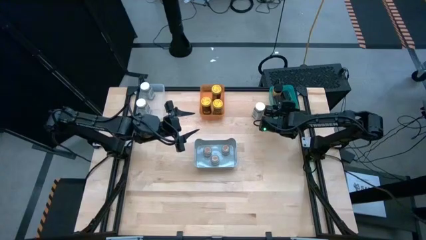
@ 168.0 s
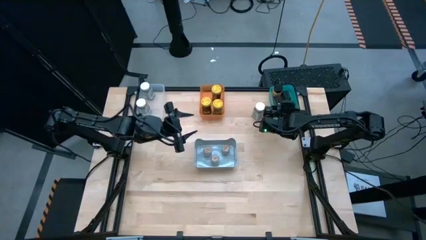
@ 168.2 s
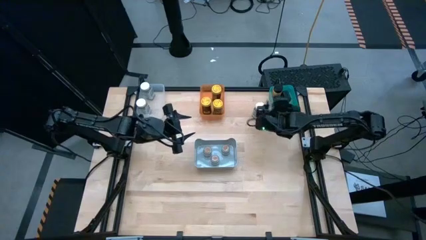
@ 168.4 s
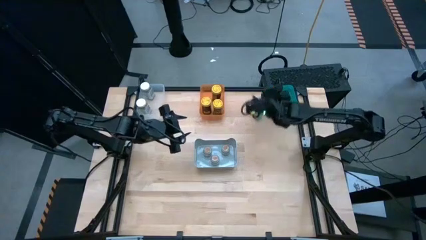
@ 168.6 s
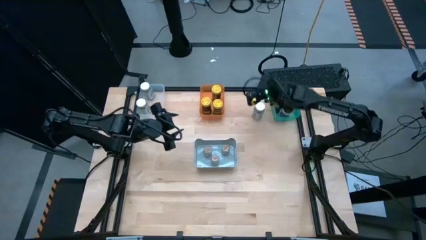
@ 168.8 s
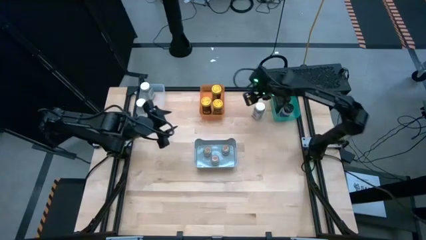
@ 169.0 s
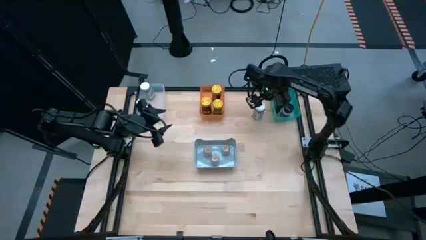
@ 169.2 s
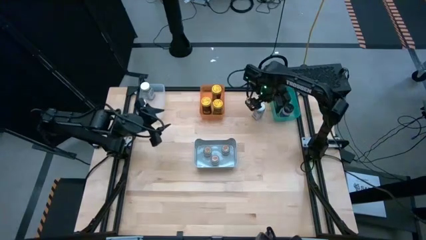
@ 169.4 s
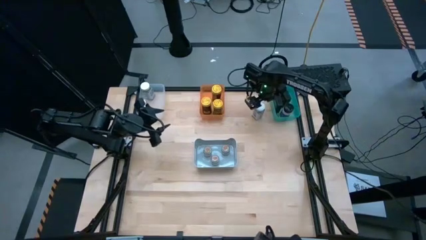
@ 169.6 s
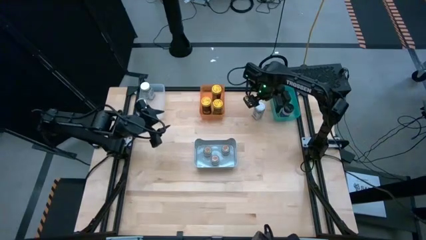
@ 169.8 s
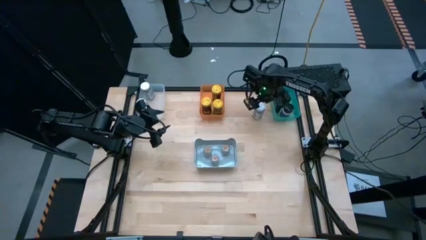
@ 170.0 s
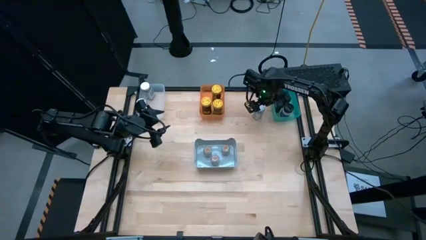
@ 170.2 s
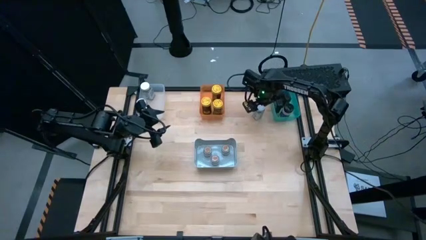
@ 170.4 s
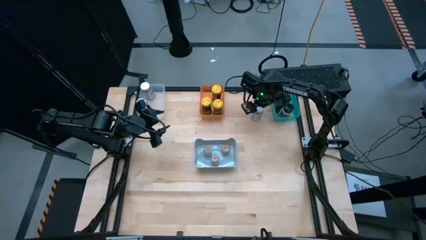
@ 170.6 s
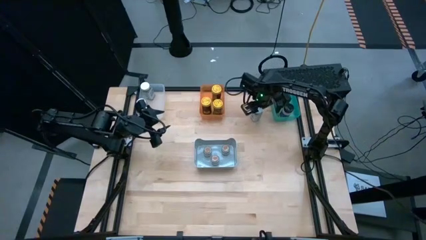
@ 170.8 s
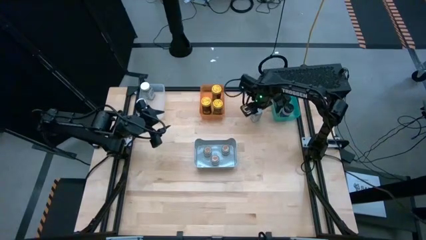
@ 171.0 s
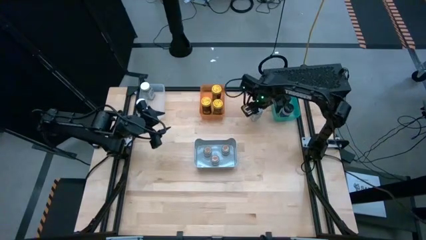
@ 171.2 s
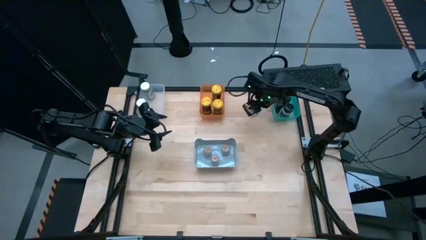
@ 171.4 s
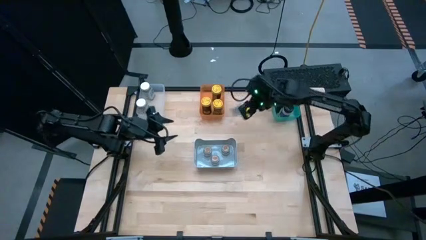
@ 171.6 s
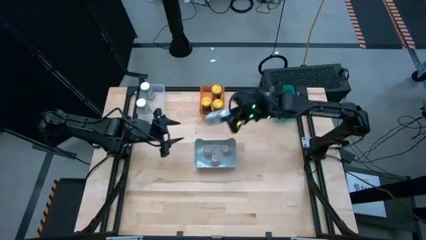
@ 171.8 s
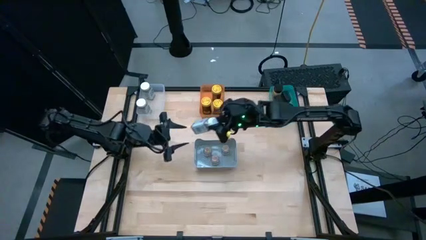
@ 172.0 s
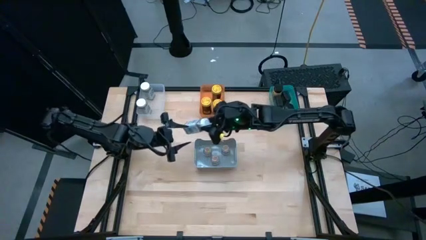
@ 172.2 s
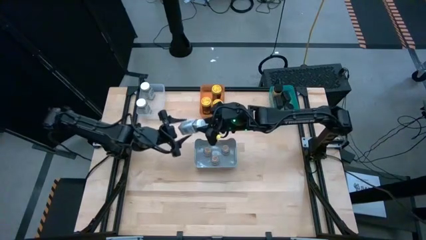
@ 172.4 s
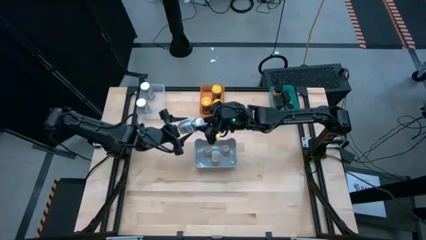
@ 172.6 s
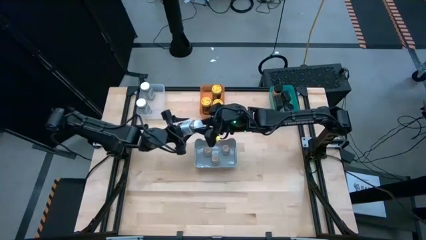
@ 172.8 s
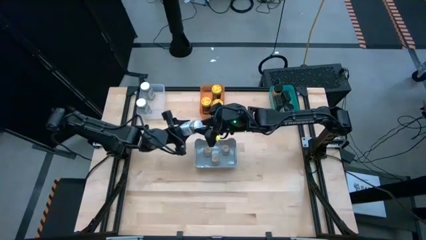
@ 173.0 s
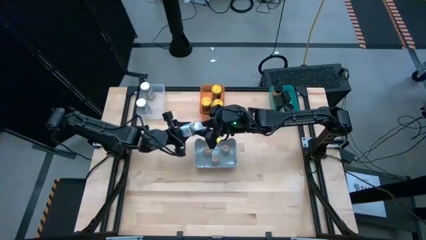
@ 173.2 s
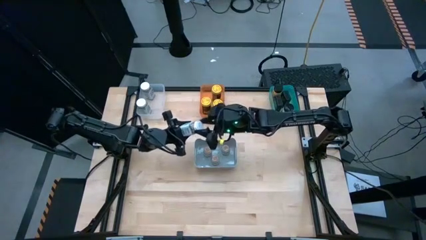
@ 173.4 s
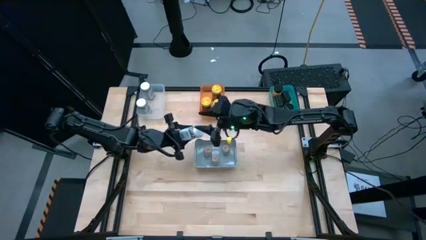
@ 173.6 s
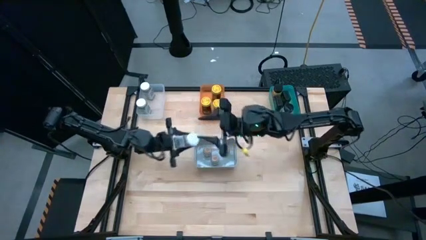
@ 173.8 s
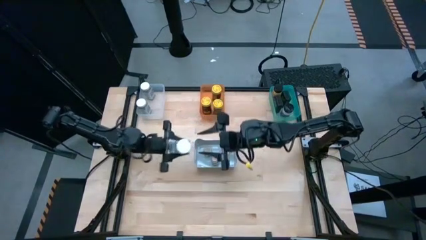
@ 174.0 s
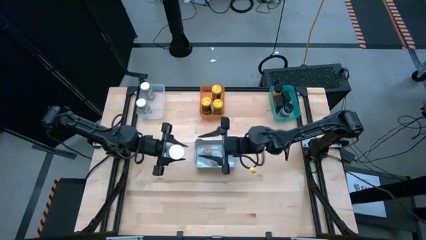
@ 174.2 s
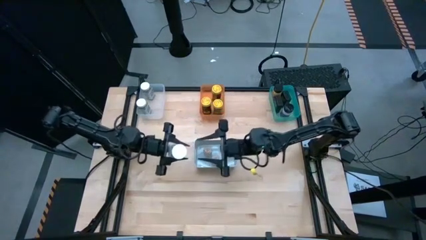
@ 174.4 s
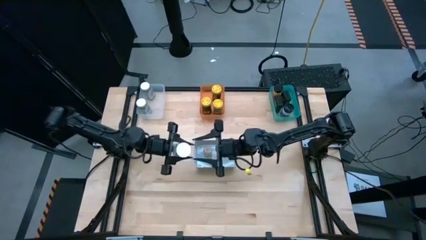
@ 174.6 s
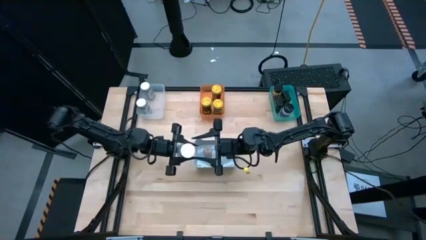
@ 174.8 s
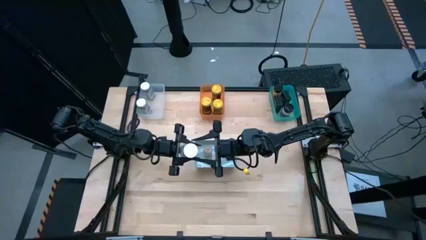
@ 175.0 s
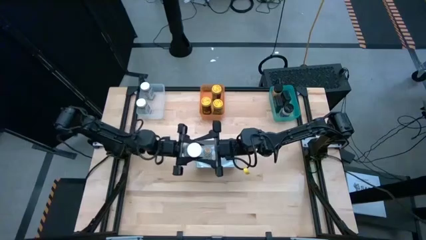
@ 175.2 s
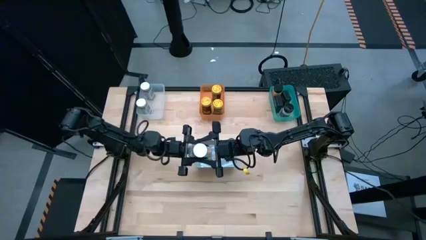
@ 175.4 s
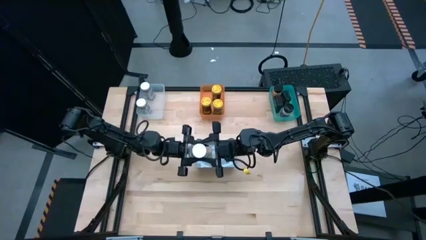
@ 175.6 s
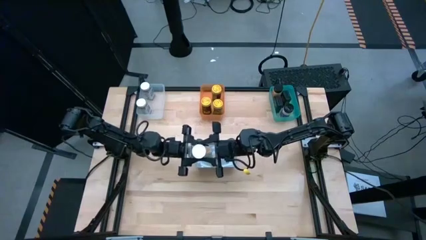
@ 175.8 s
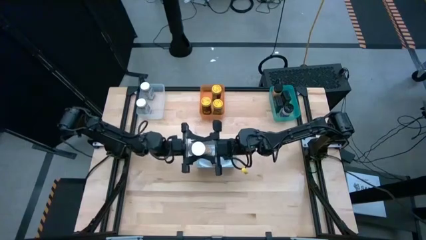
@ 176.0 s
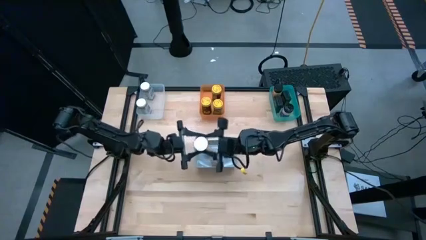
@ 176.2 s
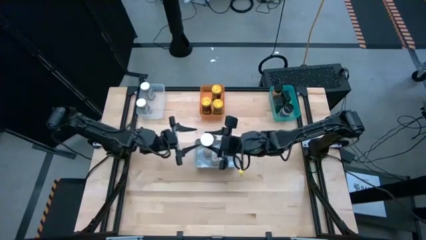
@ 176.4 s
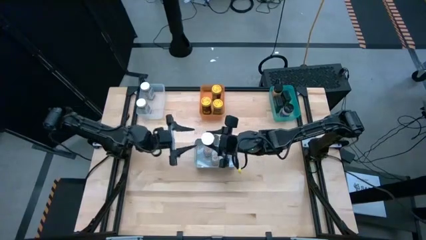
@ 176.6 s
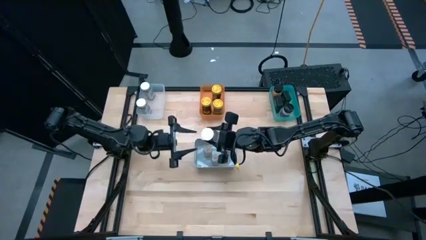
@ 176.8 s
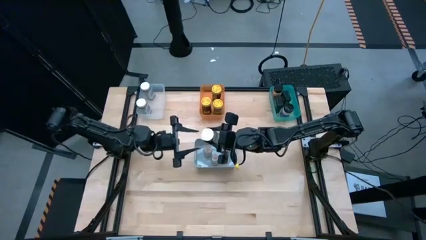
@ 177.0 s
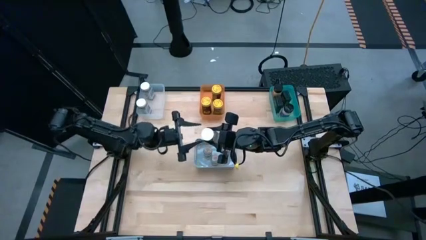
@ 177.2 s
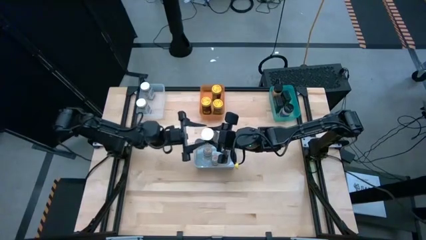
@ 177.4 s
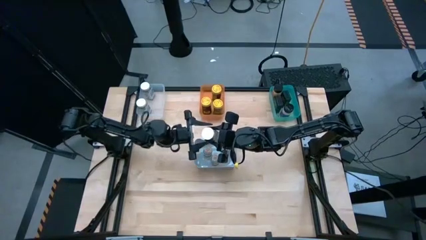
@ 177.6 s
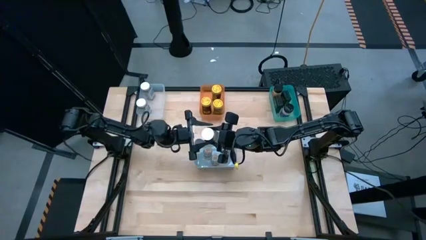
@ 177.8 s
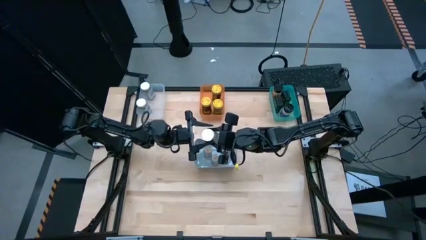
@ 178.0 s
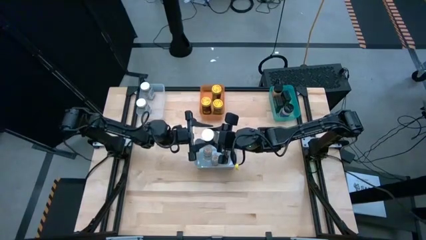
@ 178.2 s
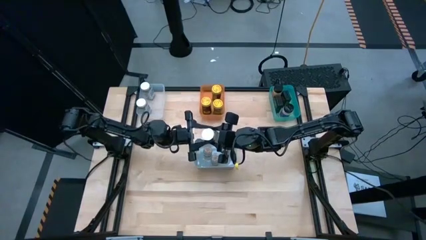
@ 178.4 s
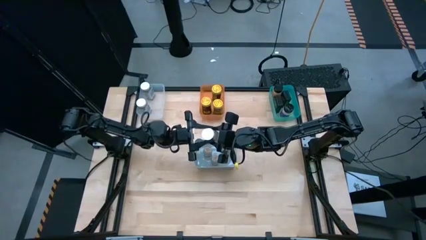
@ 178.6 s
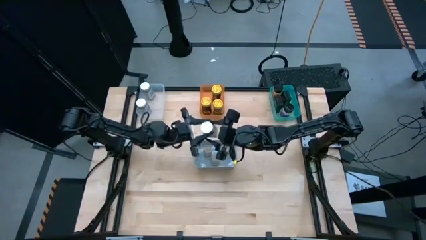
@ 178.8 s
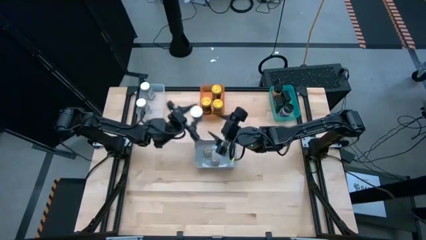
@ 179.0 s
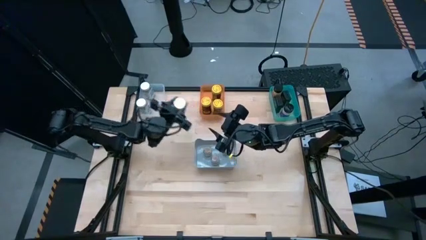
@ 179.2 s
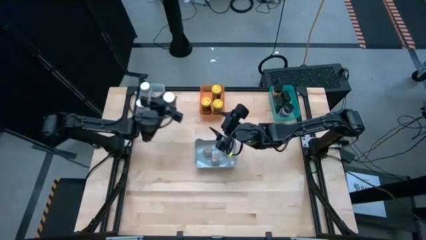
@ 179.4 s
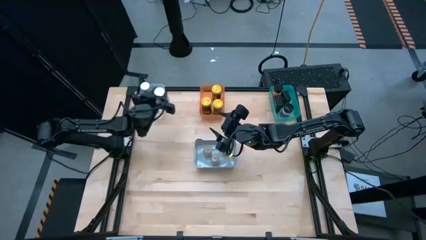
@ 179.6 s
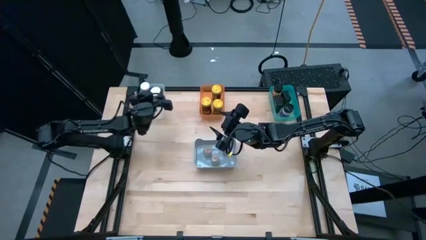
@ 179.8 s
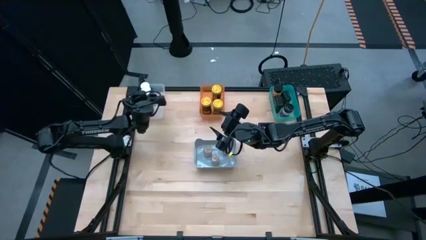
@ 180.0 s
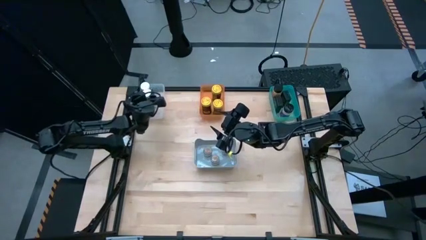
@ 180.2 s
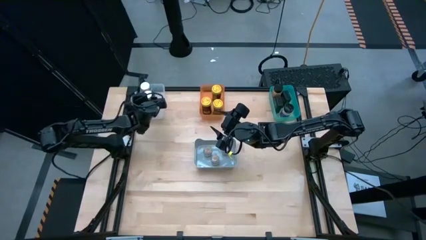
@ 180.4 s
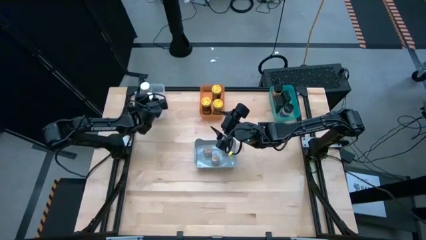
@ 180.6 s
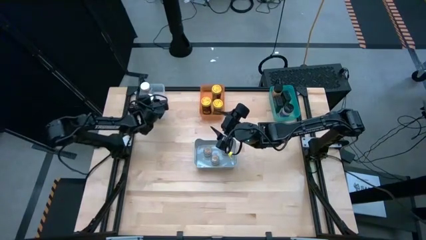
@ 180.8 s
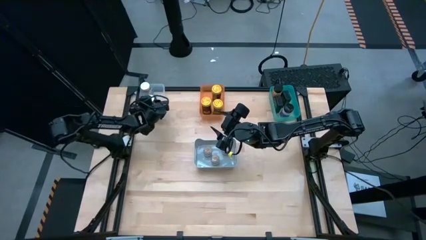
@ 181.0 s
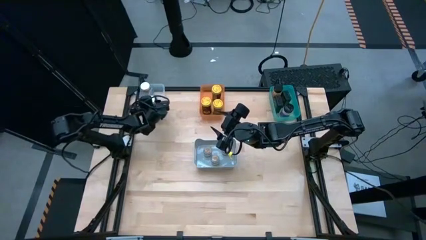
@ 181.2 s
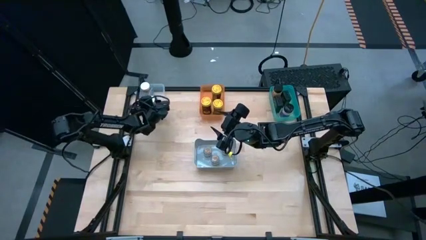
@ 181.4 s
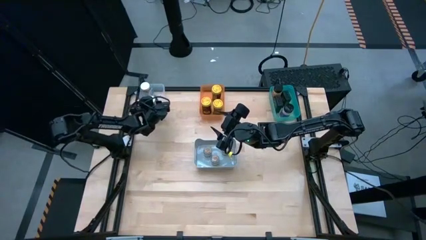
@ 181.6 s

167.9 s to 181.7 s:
Task: Sort spices by type
Put the white seasoning bottle into the transparent bin
